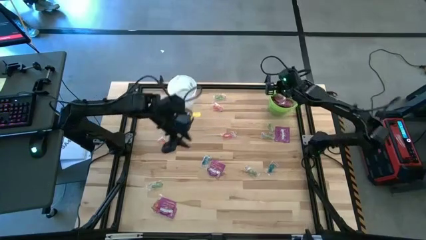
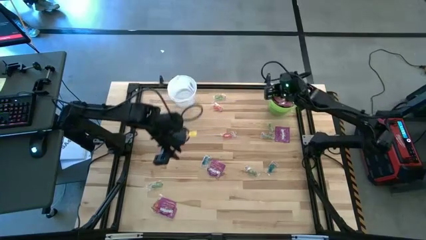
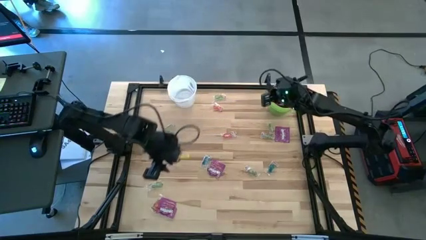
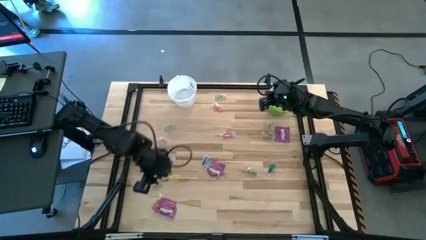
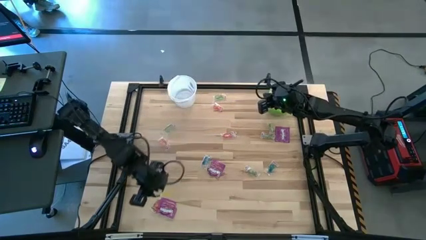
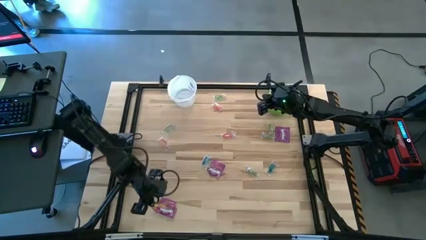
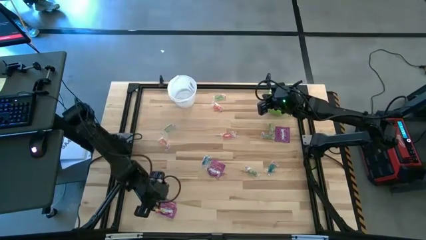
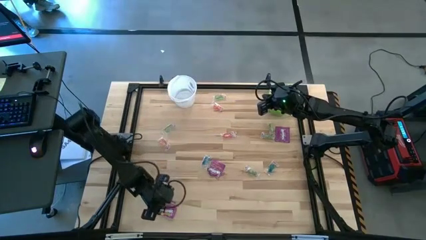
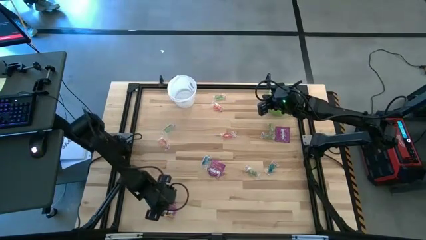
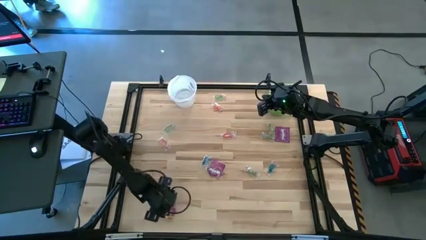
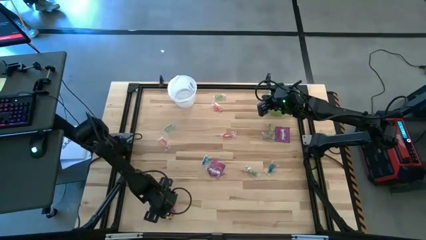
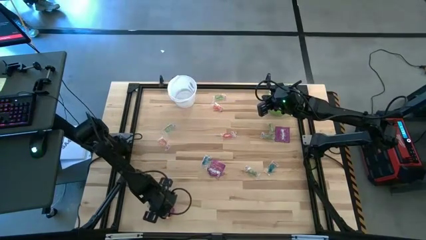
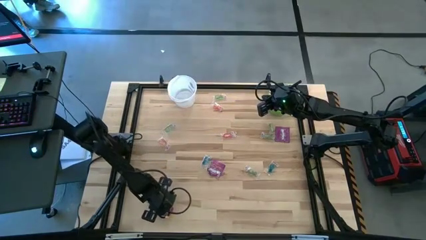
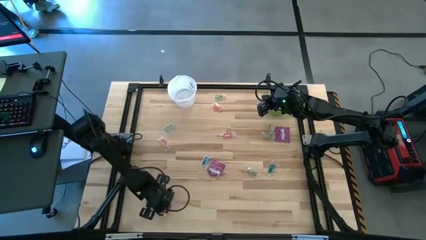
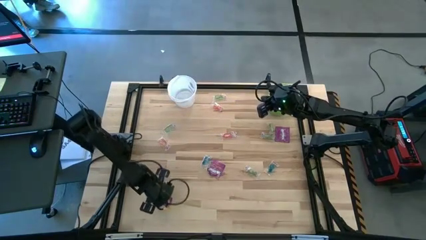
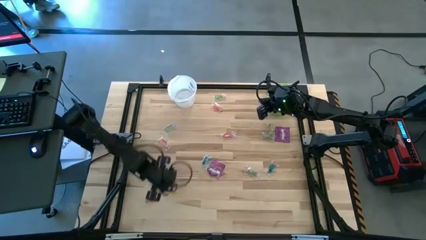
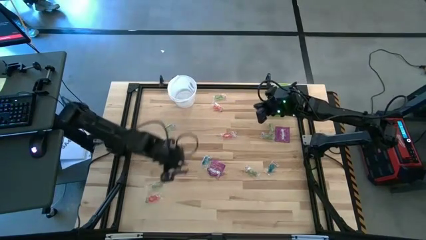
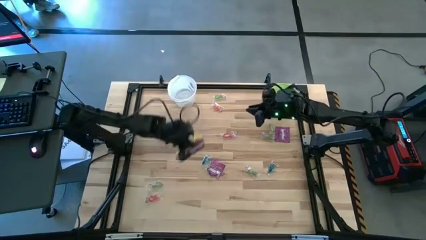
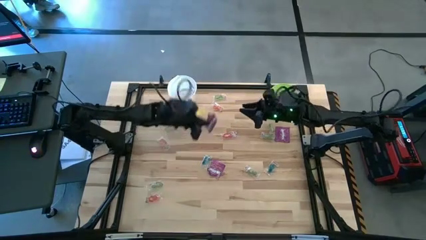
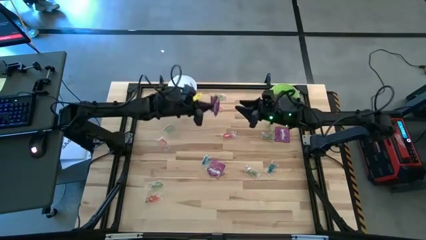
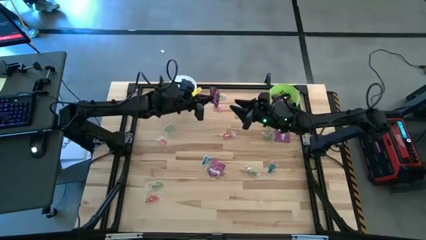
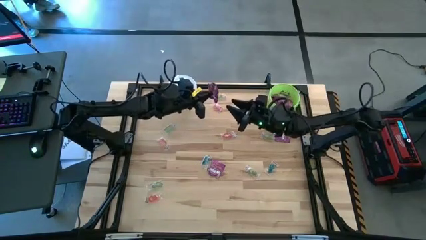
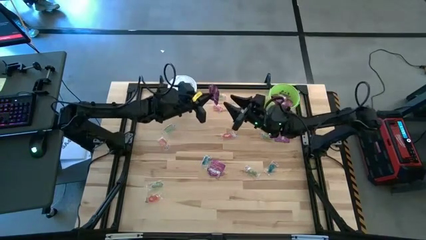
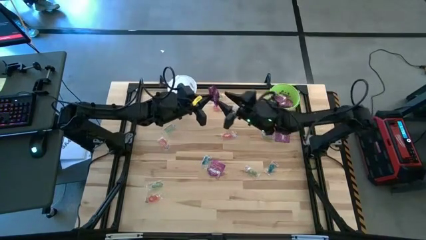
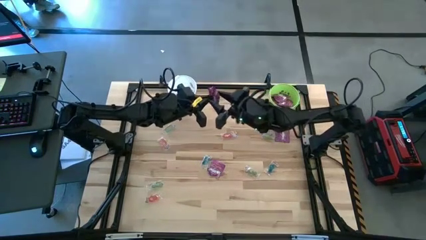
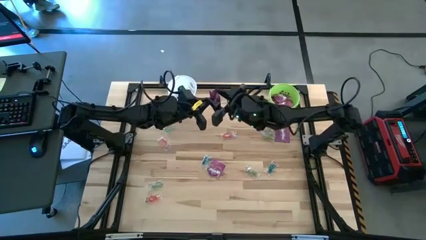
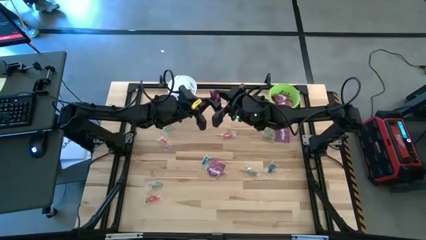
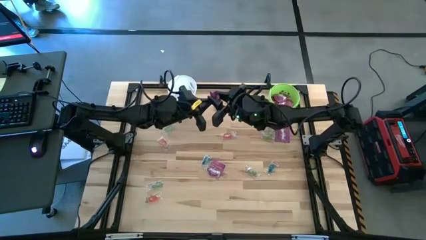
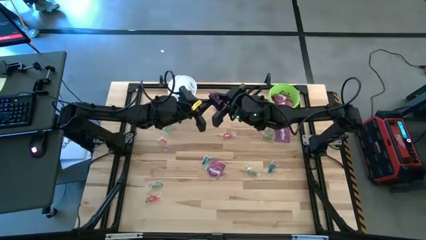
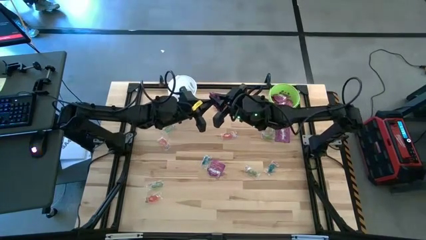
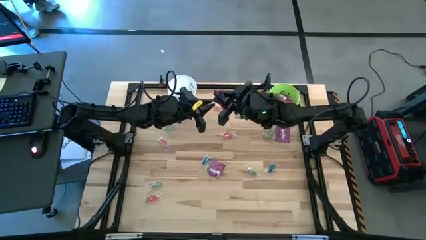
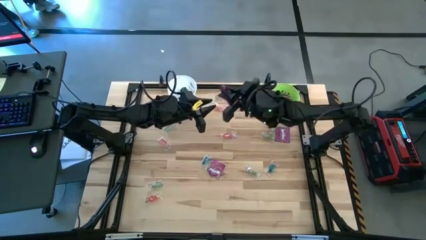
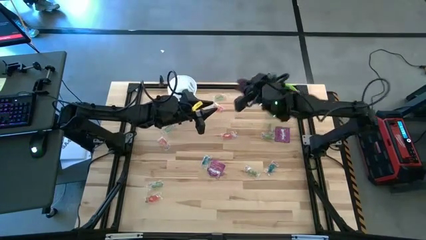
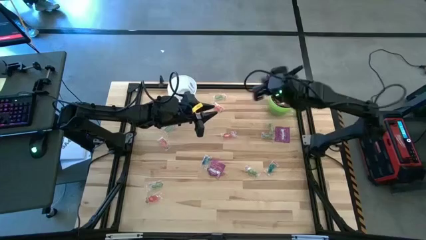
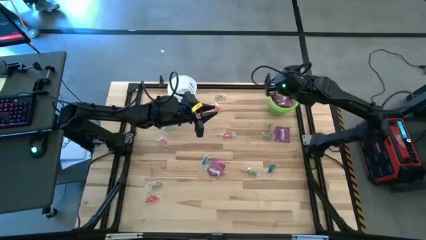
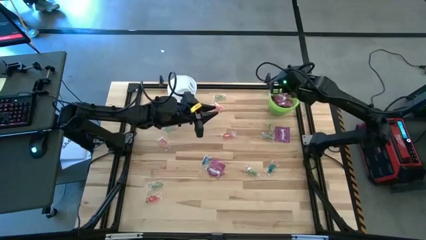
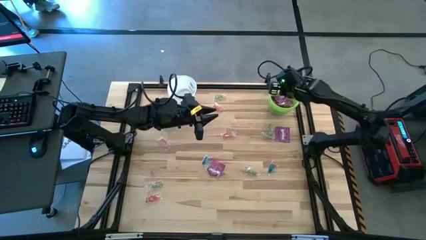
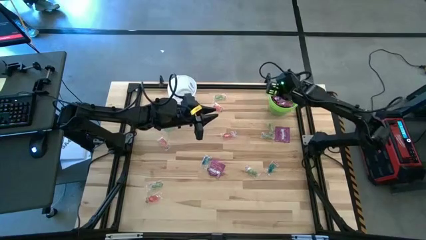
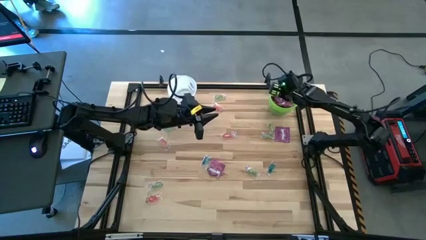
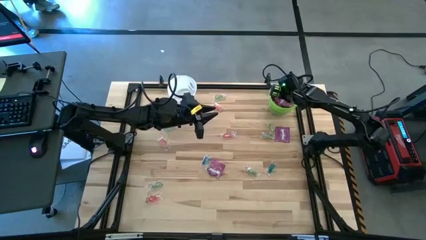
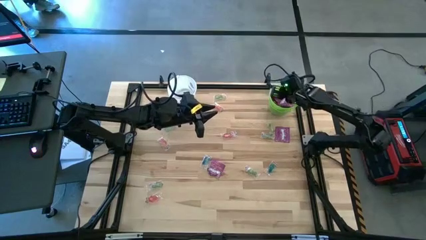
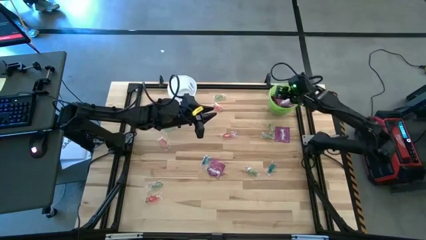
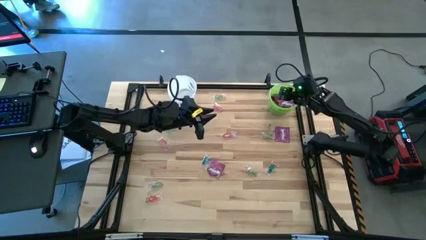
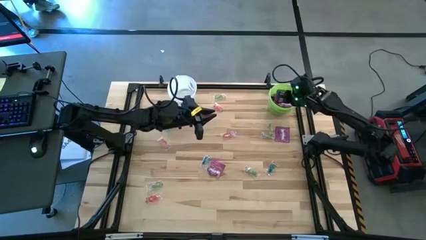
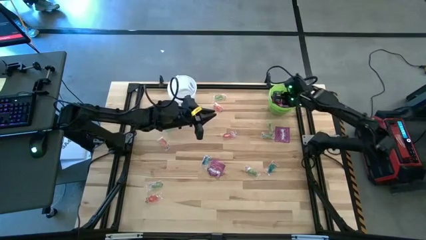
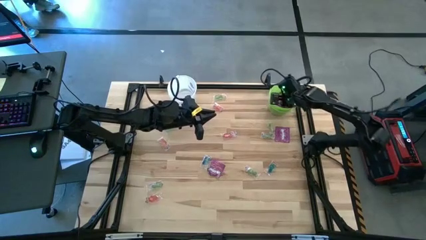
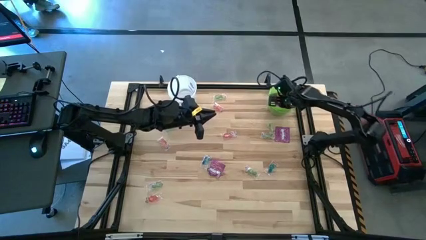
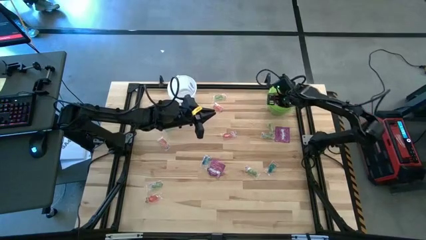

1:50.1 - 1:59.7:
Task: Sort candy by brand, put in halloween buckets
Put the violet candy into the green bucket

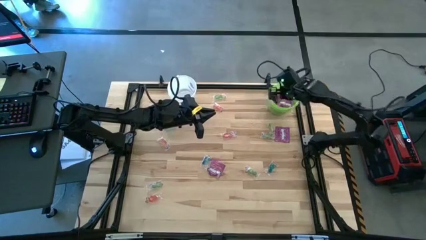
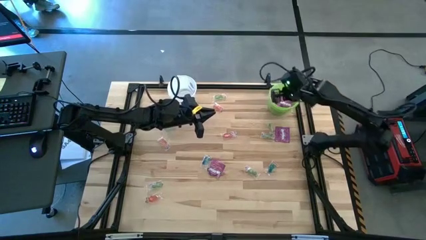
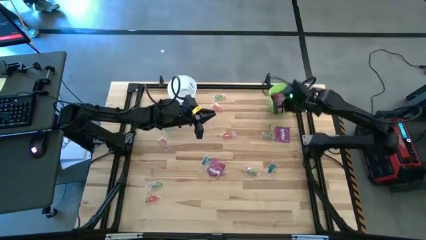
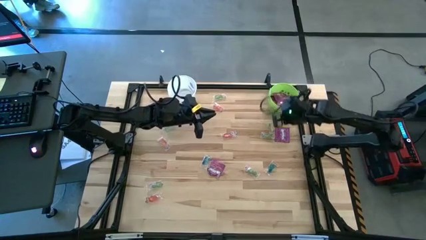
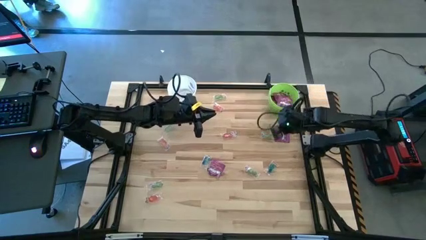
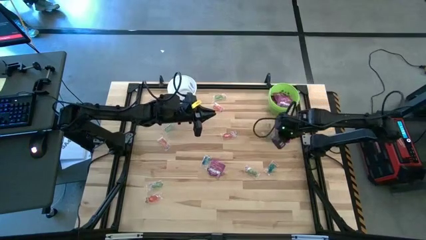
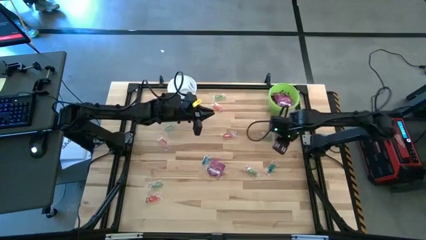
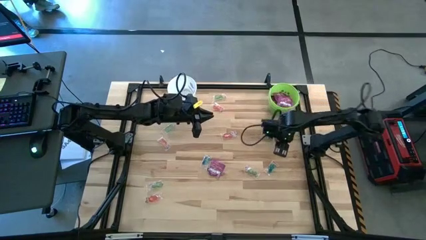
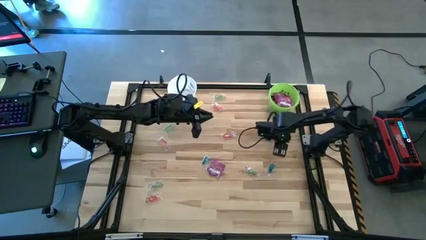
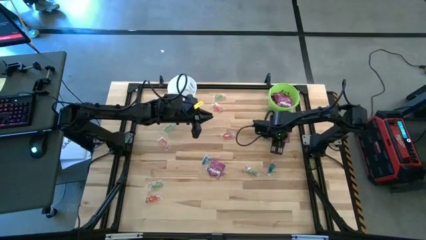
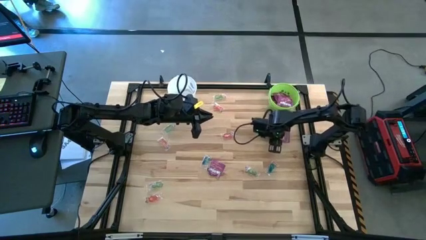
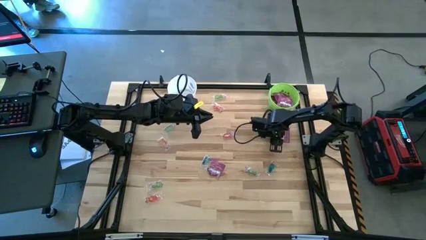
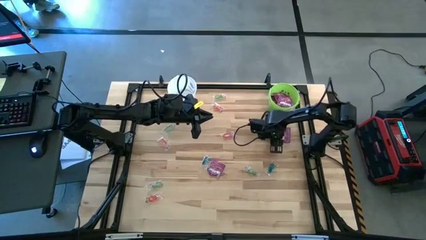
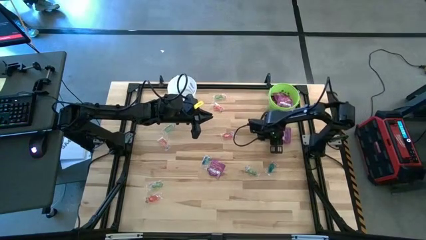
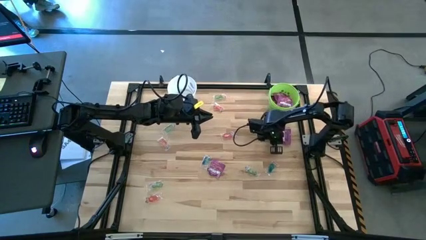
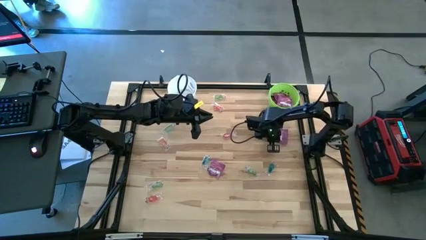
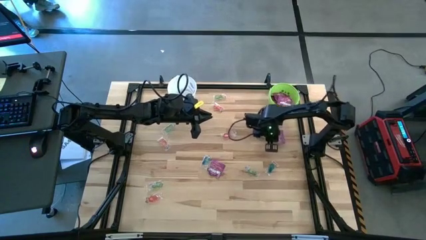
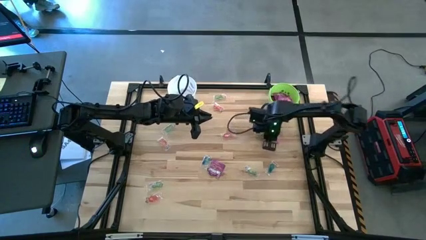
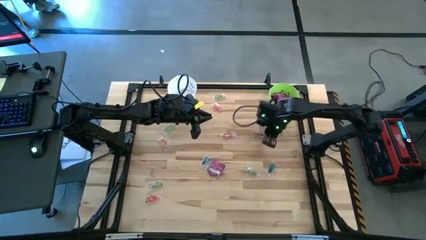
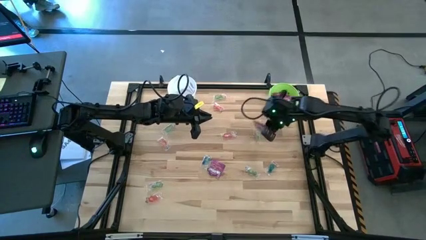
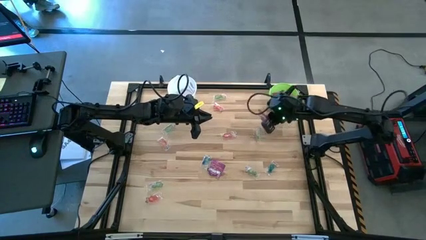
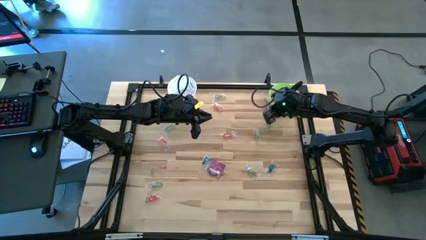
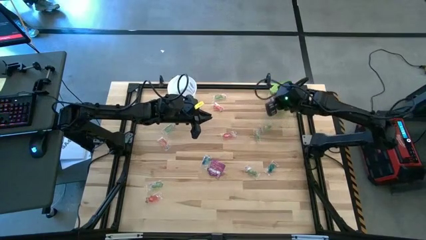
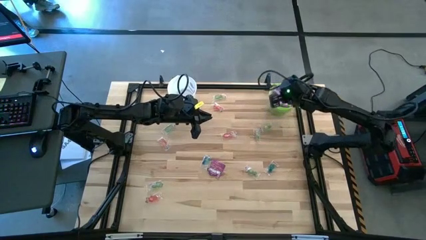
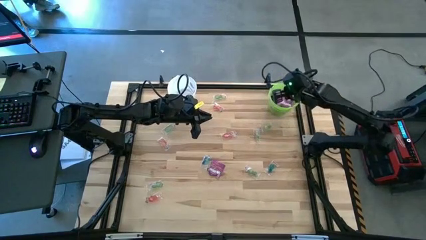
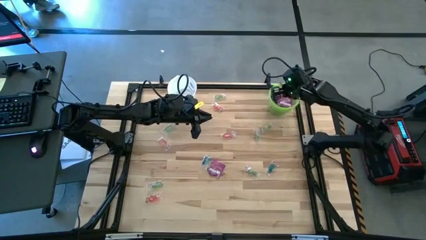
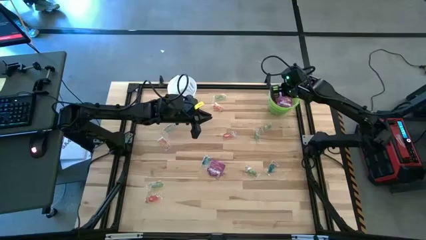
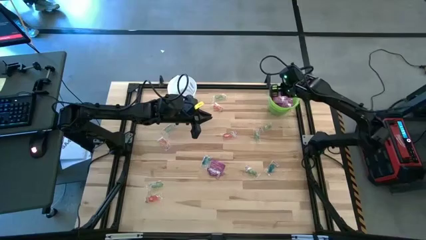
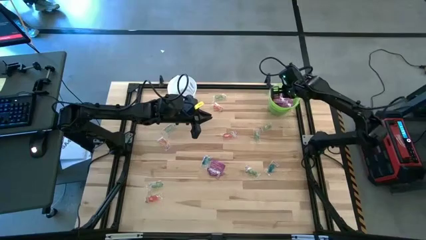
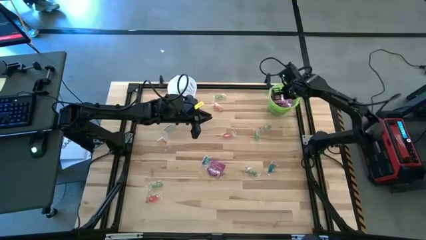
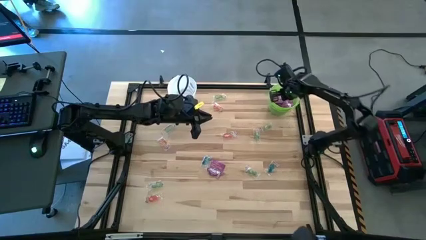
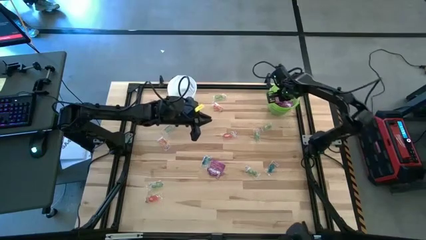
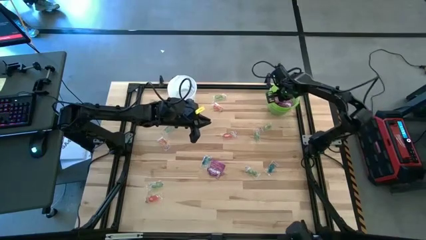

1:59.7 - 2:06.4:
Put the violet candy into the green bucket
